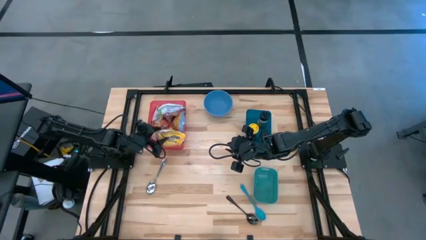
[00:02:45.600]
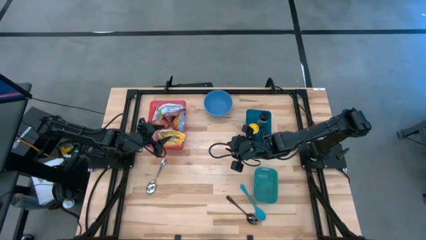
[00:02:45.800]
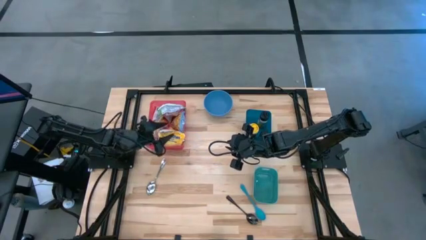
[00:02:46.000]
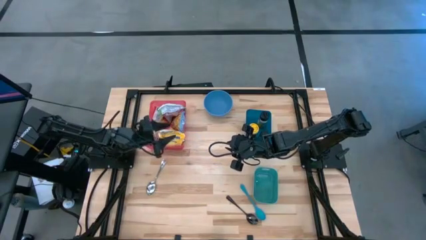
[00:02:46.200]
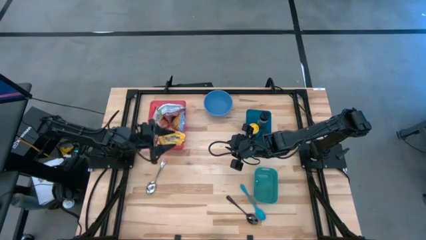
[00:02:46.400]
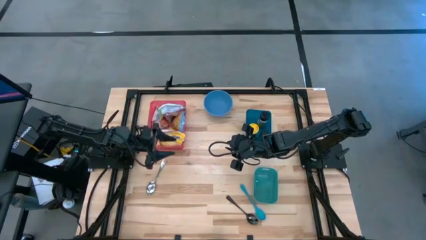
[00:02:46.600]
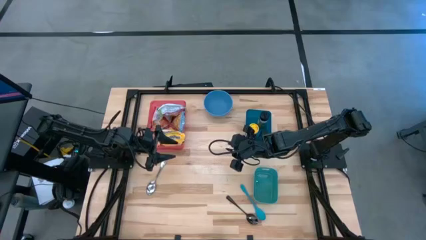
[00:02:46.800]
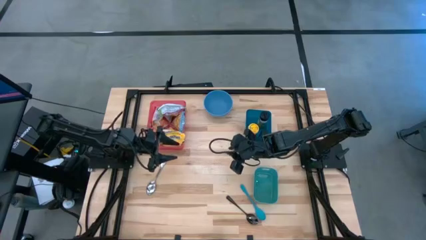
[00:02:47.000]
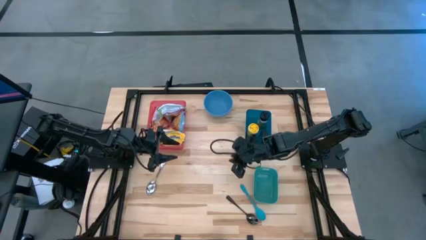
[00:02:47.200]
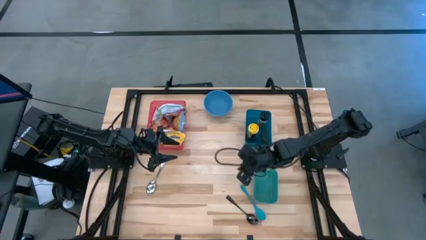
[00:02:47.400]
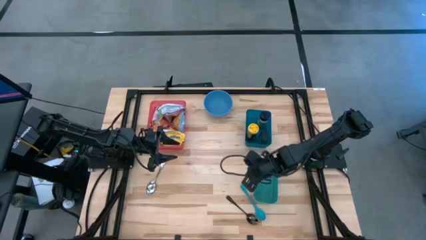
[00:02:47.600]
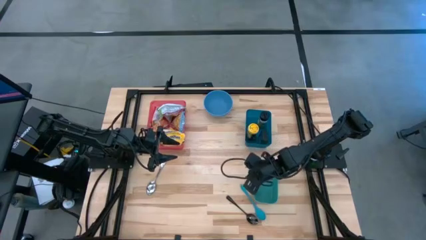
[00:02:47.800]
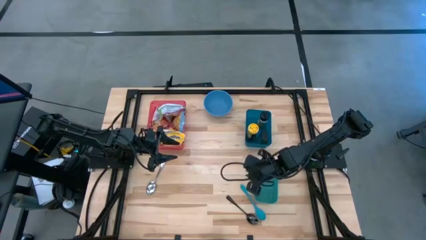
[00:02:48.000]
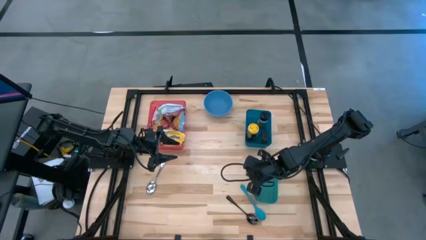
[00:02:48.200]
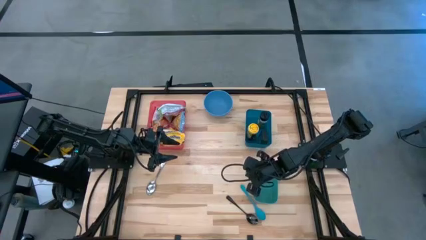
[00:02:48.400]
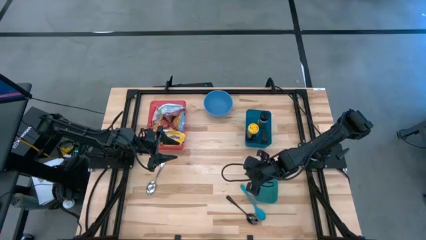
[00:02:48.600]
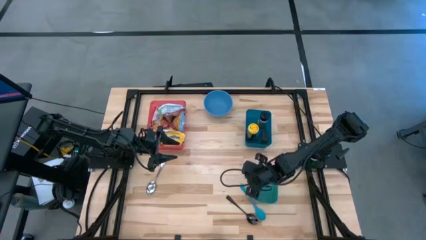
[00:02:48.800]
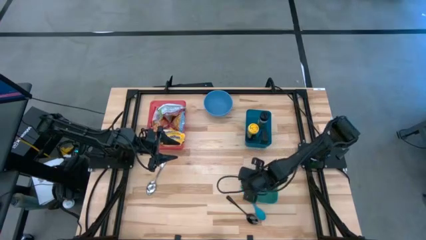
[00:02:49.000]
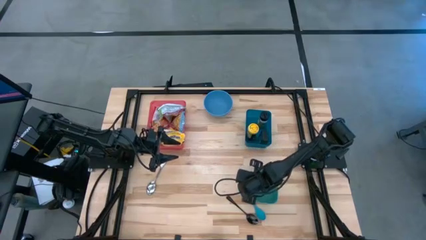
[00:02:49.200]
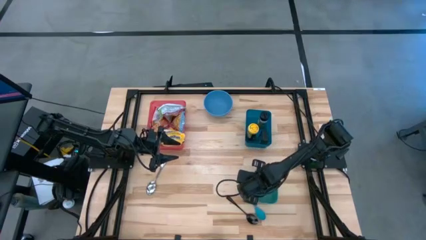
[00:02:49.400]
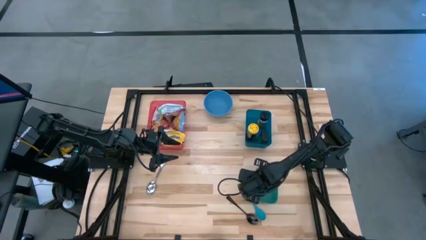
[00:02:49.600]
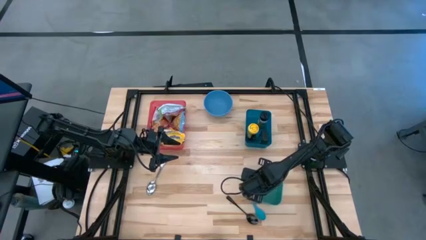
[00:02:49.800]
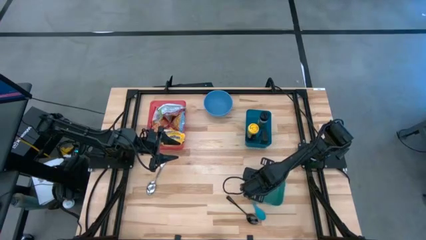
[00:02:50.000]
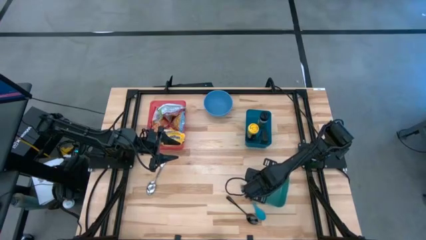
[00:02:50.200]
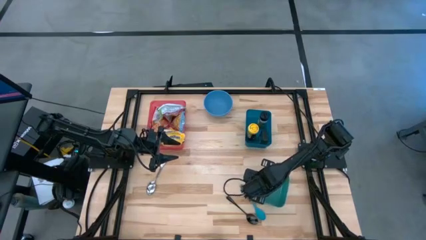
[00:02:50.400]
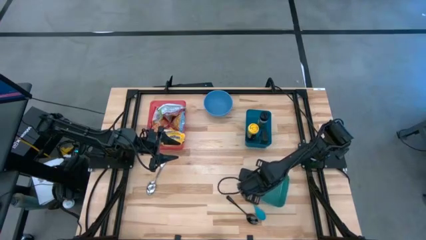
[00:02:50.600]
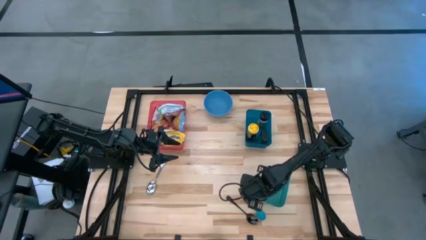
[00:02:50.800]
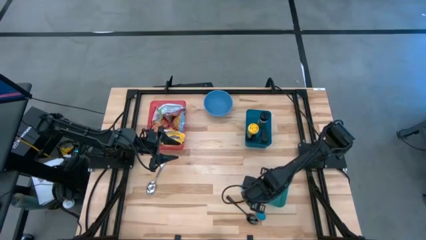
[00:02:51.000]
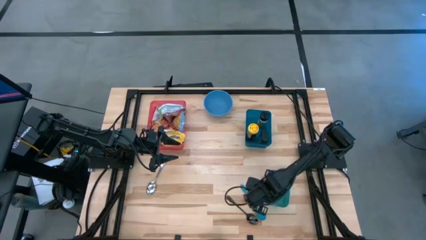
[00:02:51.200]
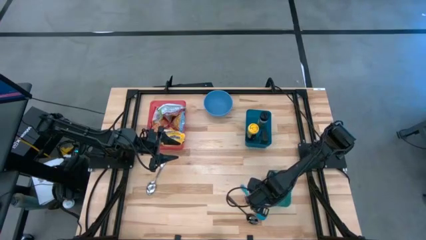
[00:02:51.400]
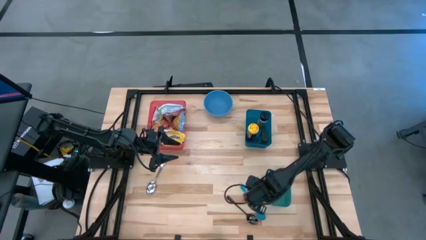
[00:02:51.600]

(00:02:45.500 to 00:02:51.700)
Task: Pick & Place Food Item
Adjust the green bin

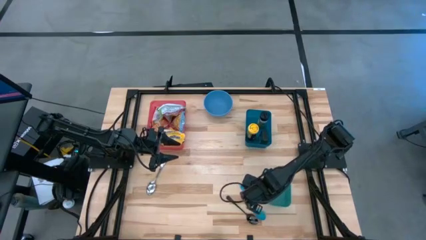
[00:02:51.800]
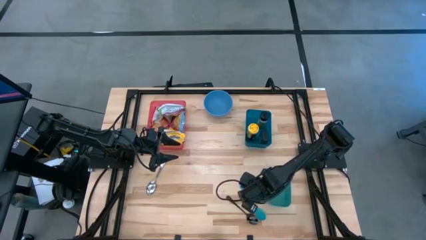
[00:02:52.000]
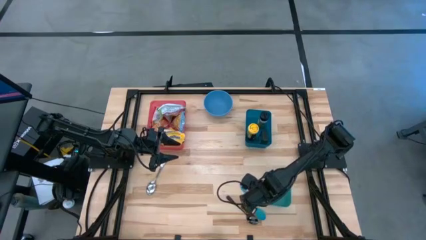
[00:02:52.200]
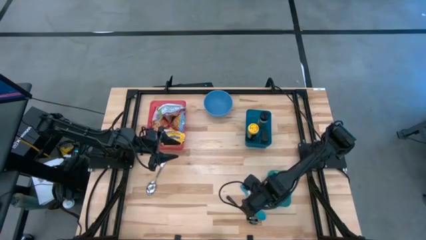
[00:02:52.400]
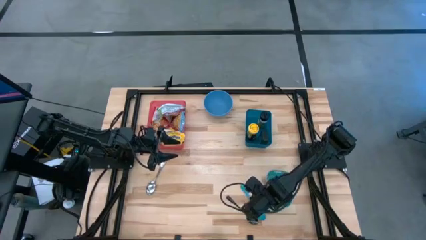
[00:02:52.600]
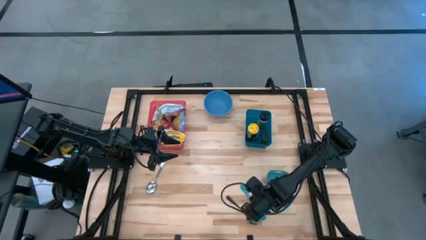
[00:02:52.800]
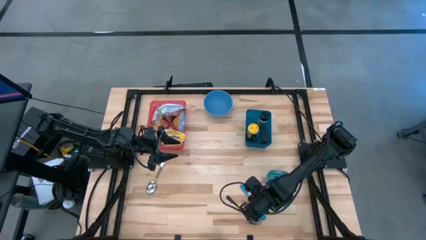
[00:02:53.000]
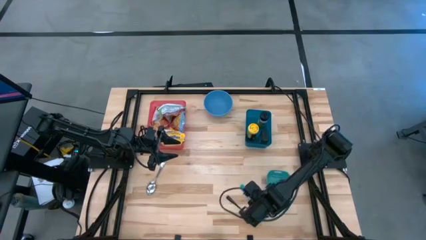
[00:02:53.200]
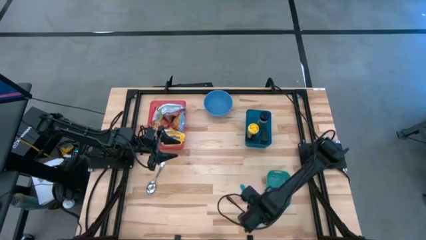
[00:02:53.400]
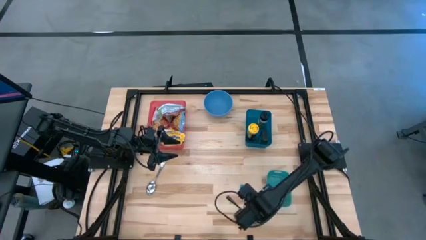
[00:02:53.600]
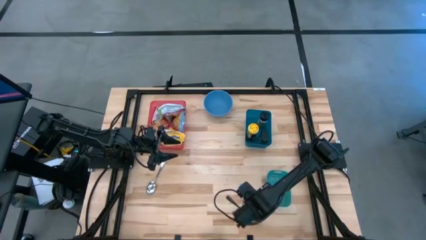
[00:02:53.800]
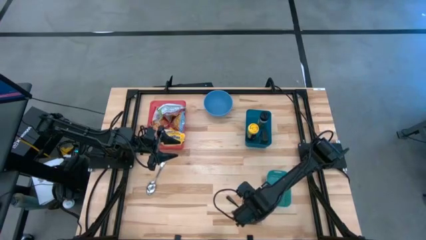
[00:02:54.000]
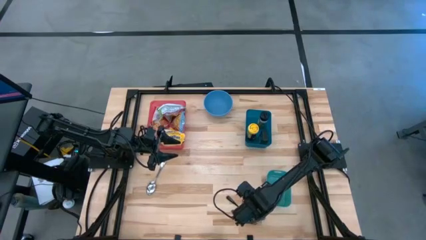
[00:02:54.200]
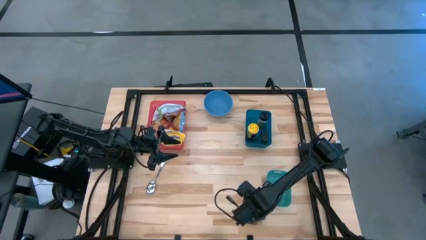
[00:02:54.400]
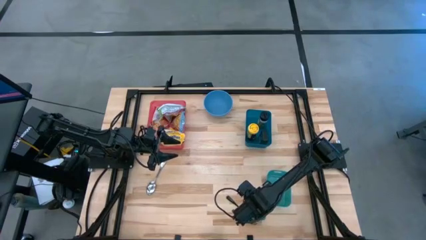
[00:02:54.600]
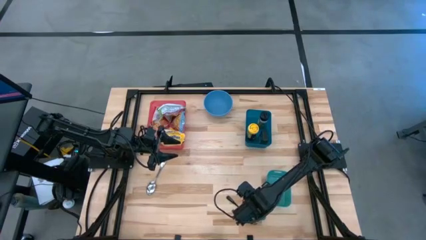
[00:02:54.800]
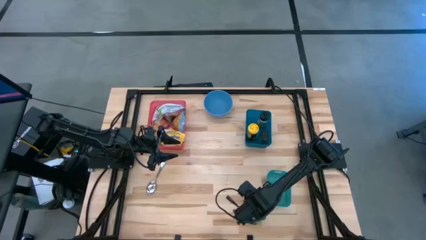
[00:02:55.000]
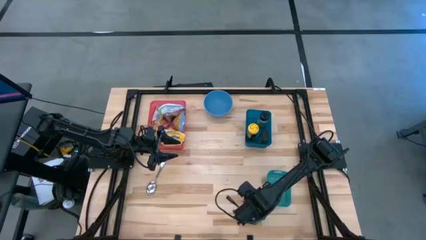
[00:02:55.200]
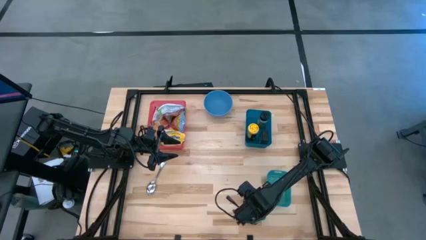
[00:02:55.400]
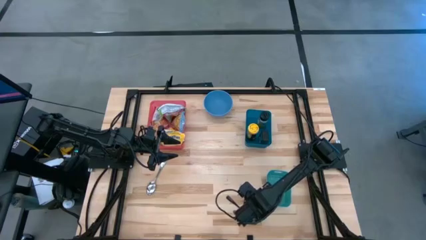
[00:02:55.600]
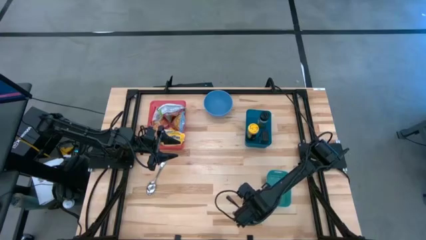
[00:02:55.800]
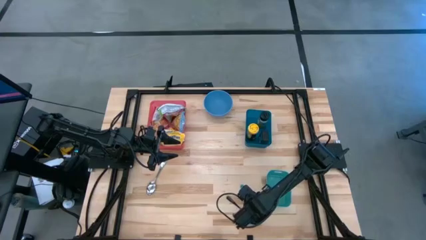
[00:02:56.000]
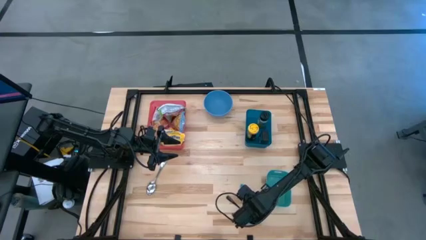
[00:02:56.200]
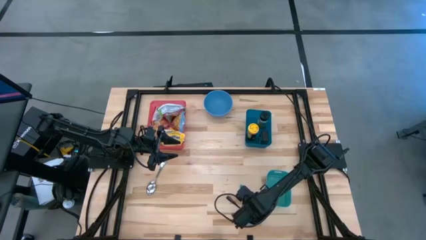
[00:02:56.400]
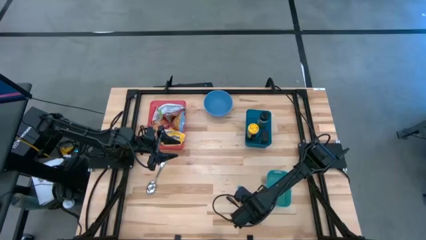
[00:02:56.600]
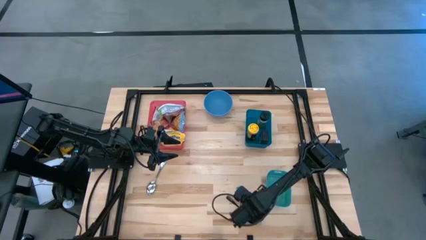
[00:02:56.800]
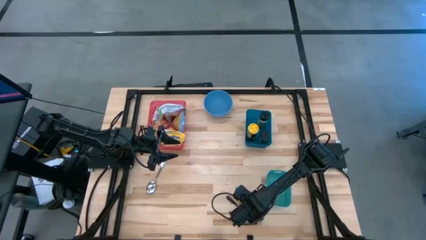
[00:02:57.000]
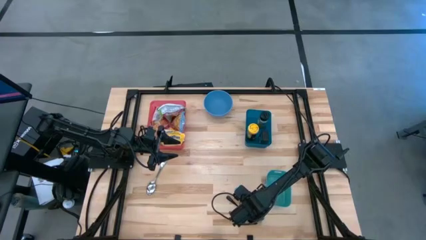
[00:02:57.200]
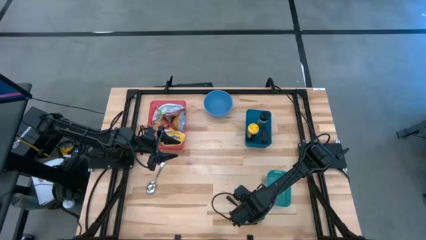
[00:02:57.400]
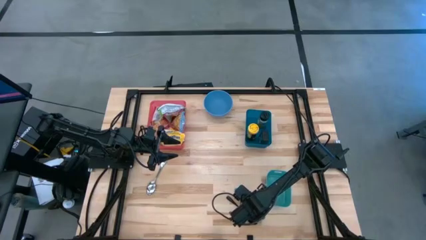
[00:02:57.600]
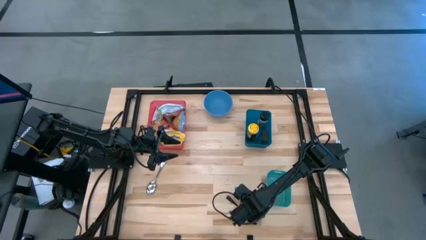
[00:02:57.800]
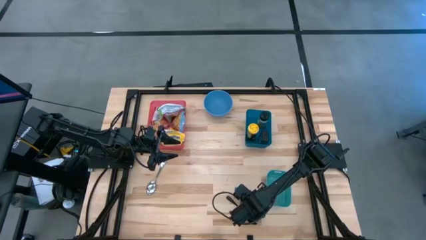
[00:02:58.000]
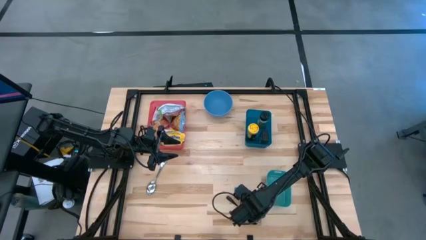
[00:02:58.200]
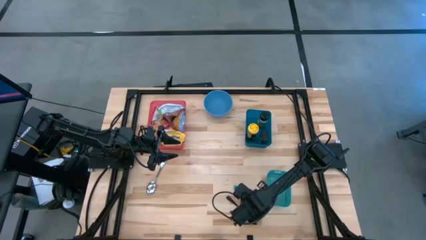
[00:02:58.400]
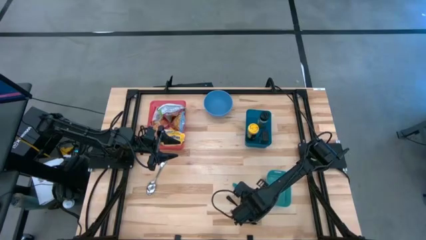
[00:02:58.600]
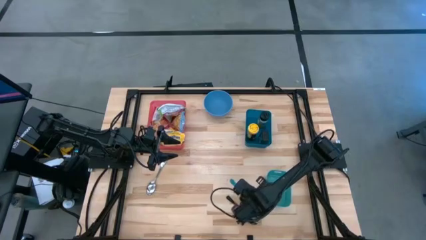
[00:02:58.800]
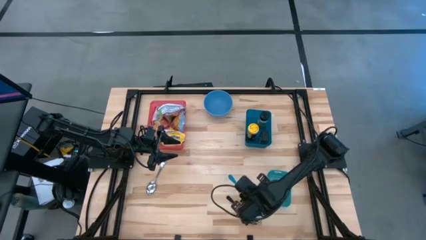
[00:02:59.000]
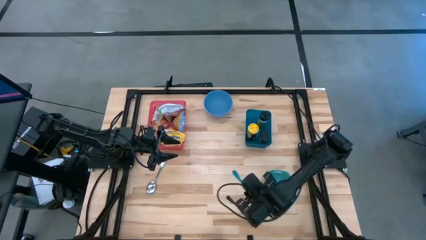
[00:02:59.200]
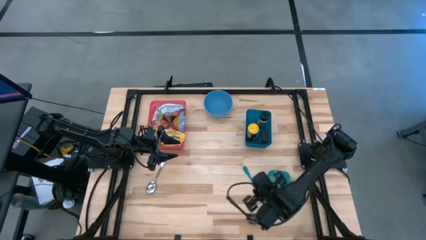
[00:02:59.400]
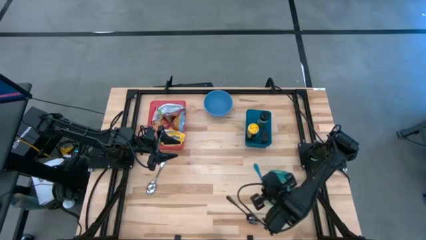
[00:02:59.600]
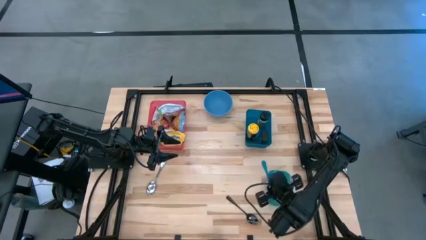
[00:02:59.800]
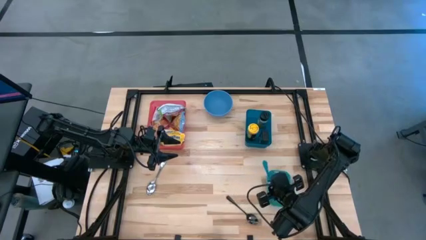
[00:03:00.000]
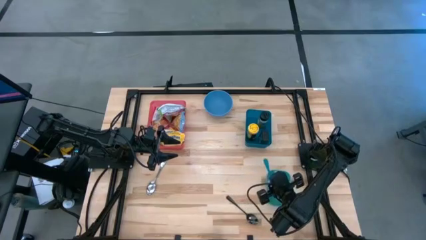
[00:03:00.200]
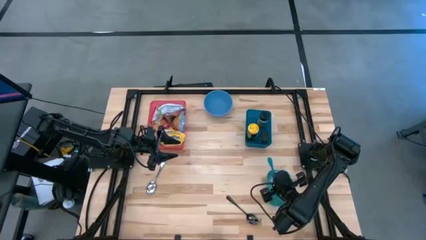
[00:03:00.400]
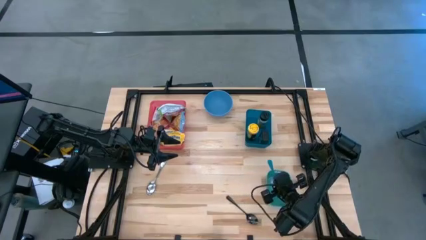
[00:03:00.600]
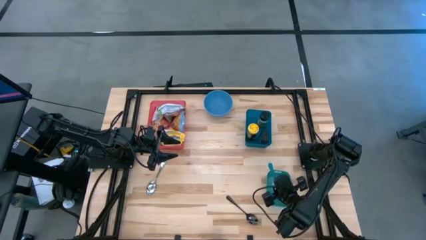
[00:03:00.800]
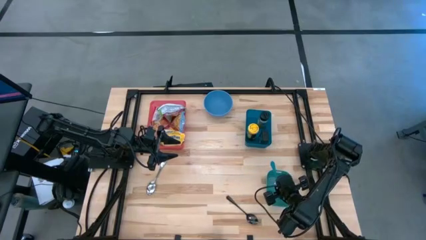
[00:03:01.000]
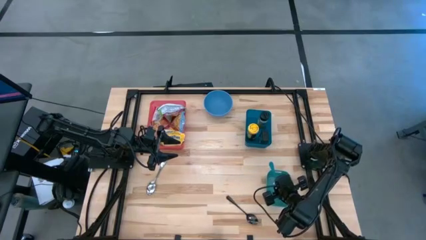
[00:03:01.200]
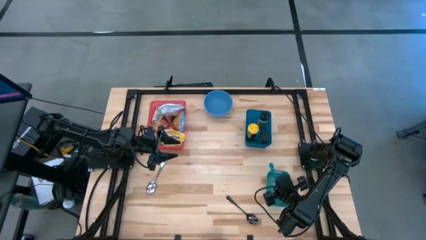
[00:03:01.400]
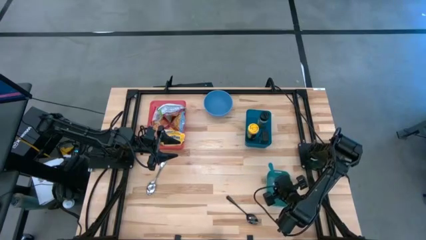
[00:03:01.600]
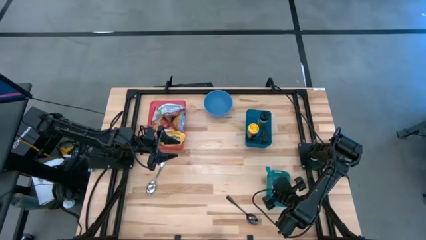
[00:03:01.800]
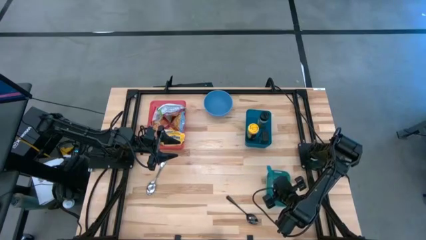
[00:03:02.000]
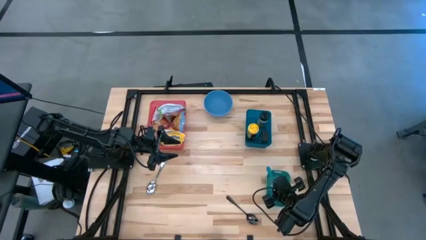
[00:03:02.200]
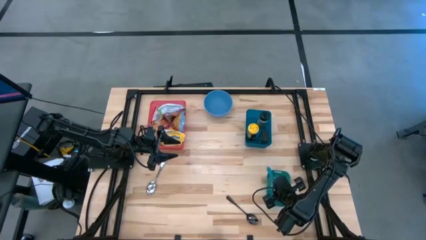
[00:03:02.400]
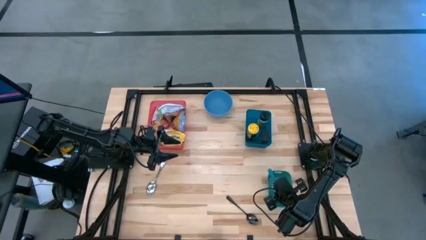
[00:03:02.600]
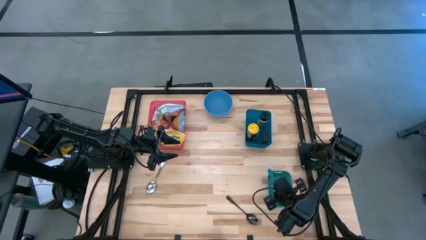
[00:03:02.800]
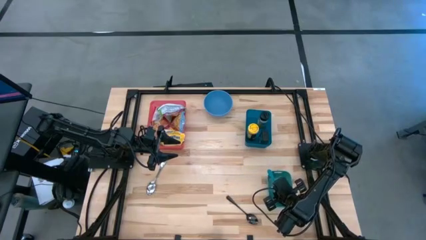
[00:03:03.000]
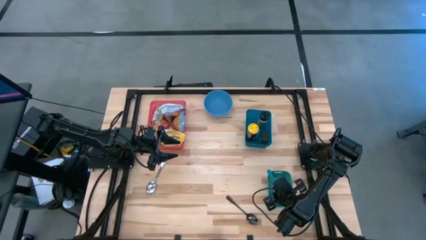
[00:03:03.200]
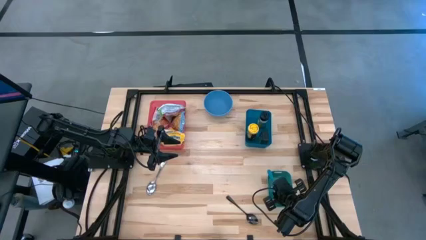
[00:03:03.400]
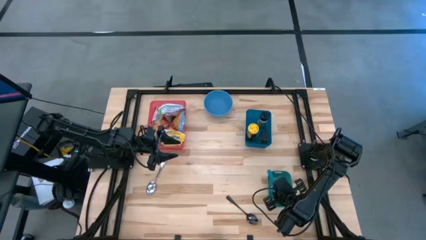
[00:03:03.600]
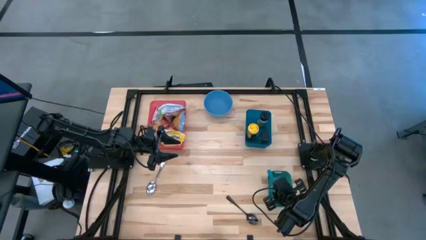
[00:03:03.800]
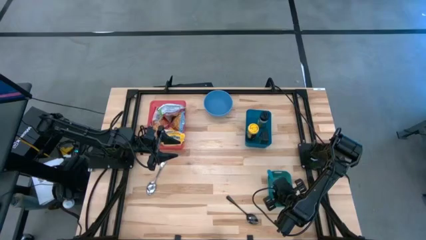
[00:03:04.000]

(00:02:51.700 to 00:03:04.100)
Put the blue baby spoon into the green bin
